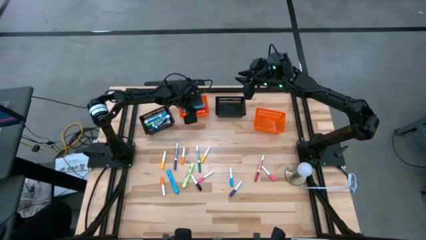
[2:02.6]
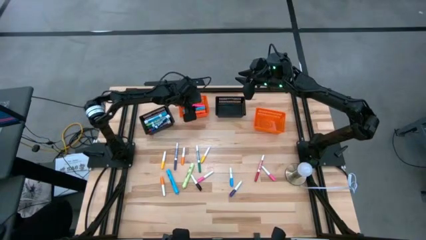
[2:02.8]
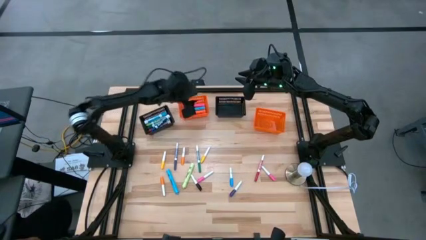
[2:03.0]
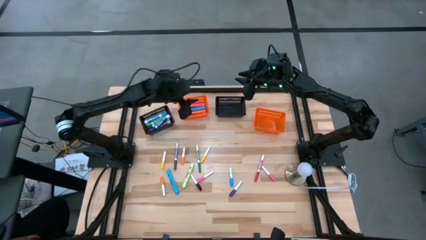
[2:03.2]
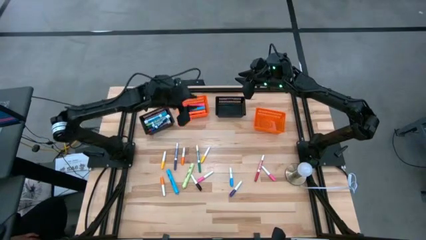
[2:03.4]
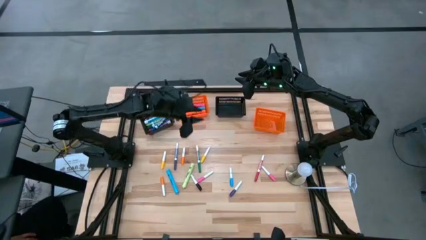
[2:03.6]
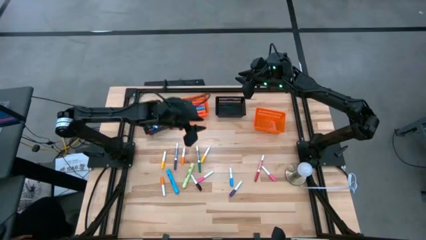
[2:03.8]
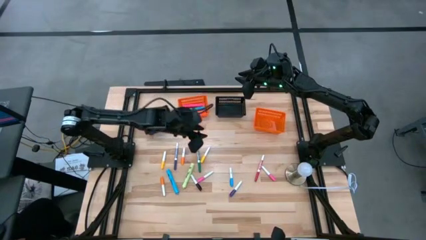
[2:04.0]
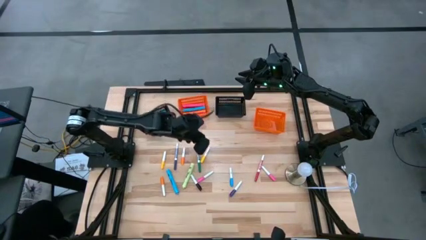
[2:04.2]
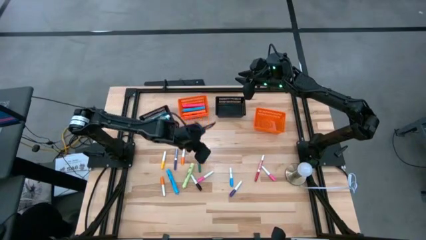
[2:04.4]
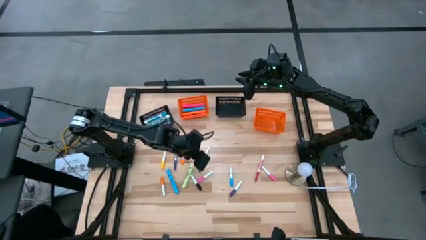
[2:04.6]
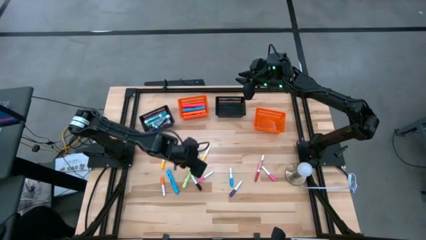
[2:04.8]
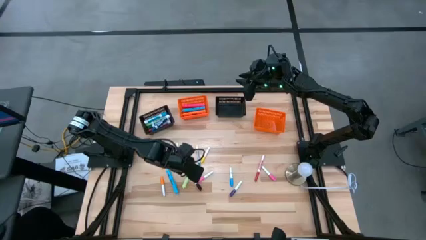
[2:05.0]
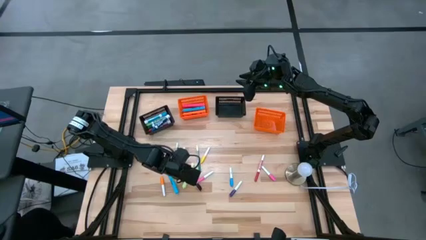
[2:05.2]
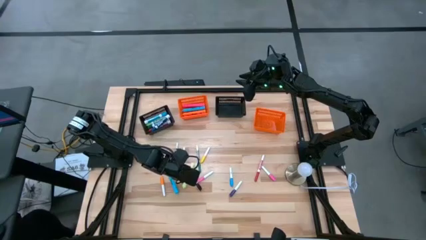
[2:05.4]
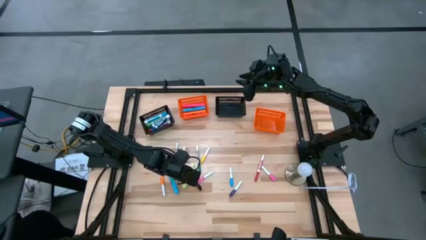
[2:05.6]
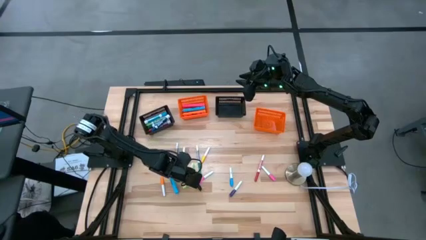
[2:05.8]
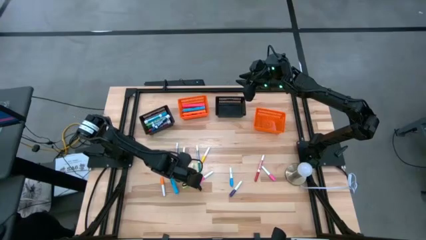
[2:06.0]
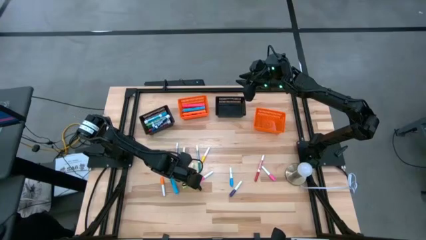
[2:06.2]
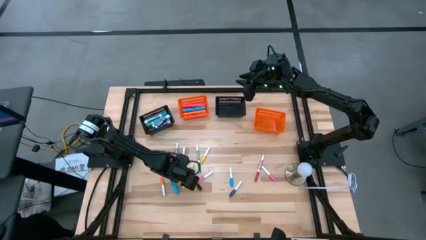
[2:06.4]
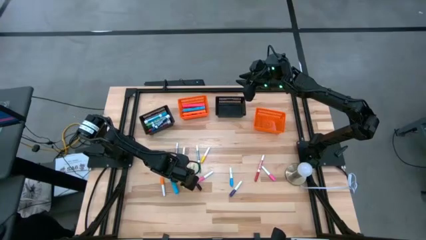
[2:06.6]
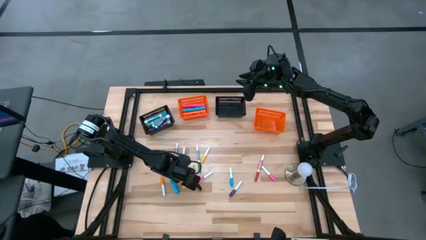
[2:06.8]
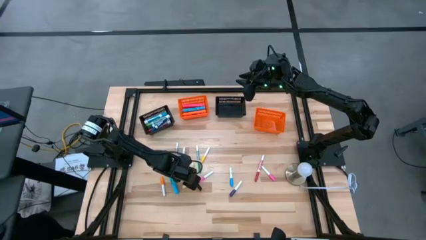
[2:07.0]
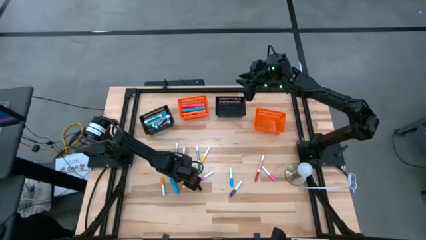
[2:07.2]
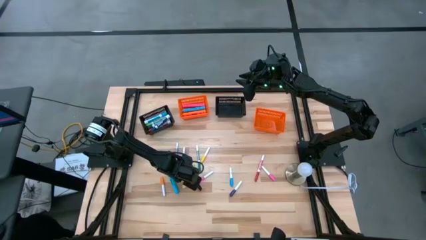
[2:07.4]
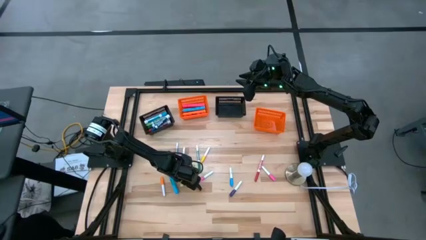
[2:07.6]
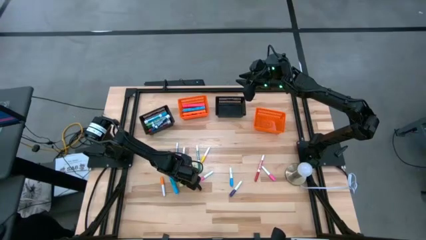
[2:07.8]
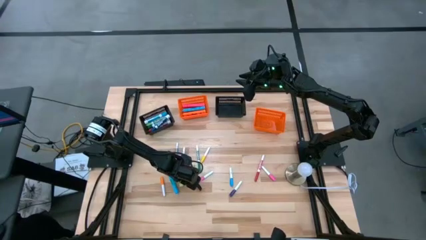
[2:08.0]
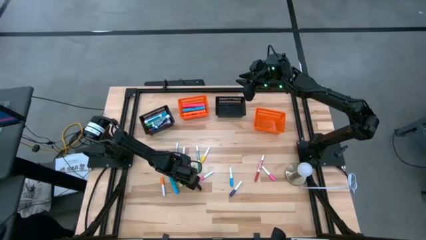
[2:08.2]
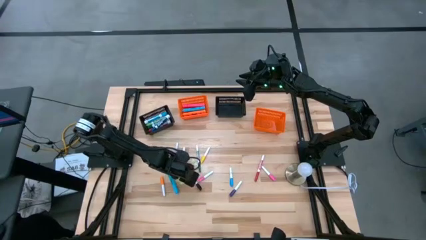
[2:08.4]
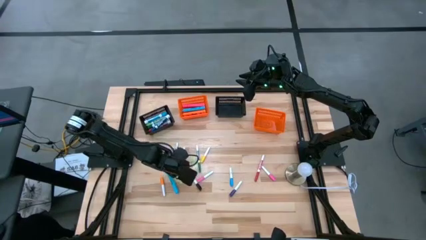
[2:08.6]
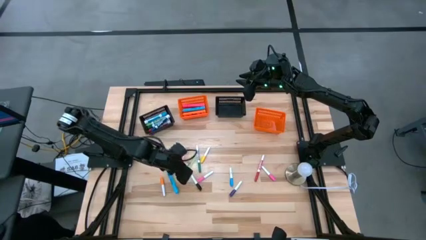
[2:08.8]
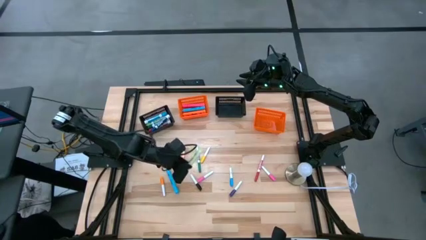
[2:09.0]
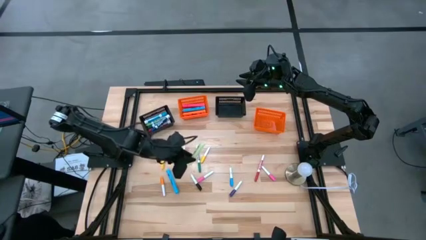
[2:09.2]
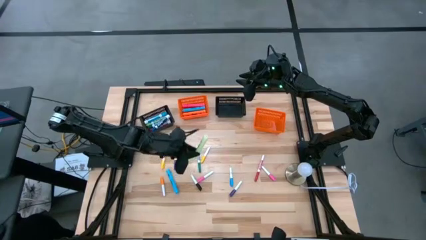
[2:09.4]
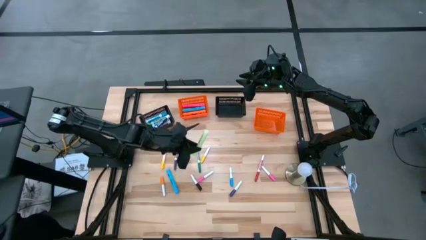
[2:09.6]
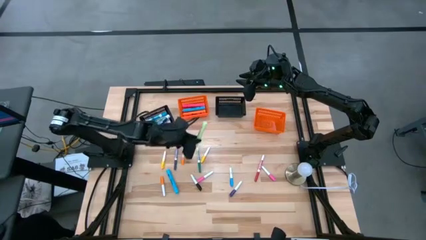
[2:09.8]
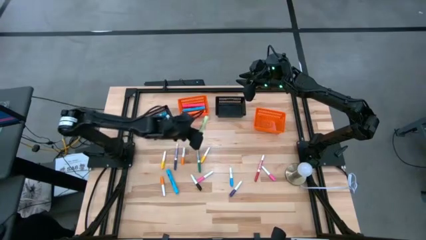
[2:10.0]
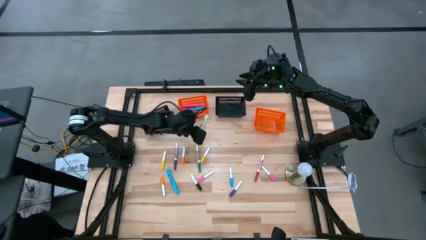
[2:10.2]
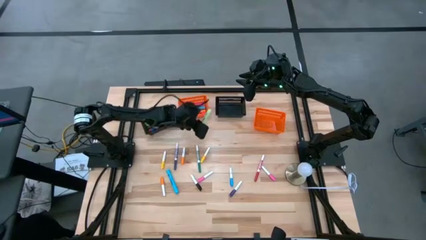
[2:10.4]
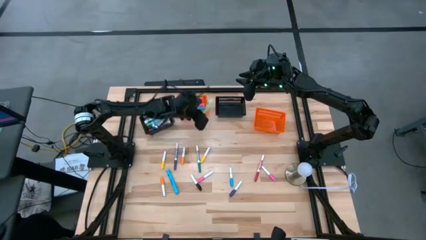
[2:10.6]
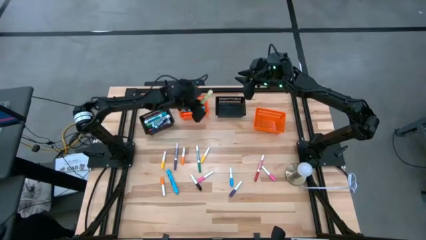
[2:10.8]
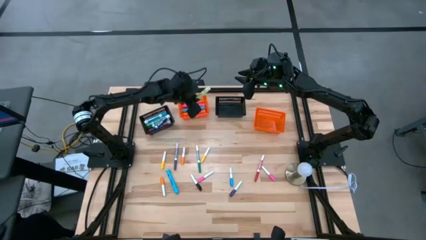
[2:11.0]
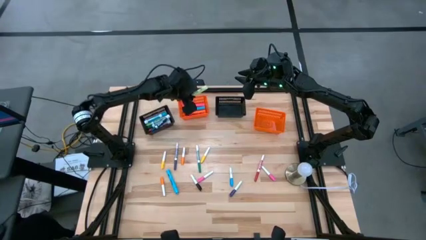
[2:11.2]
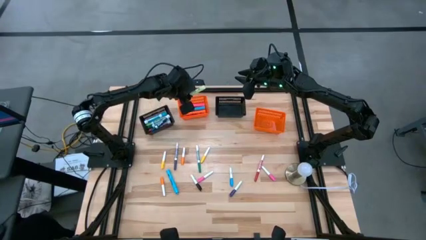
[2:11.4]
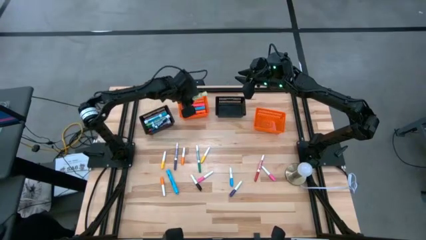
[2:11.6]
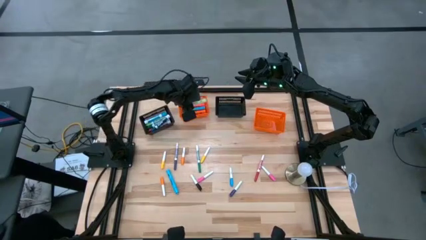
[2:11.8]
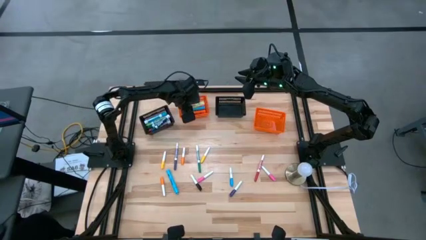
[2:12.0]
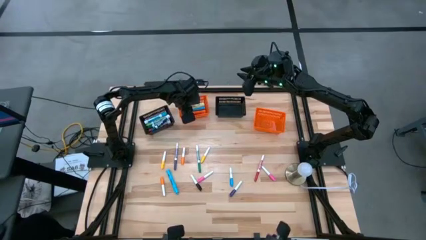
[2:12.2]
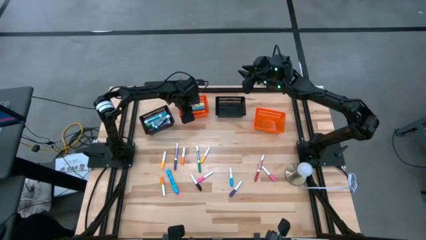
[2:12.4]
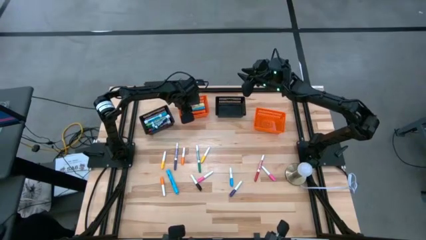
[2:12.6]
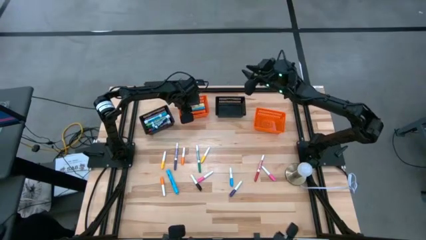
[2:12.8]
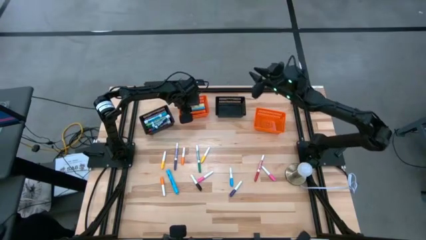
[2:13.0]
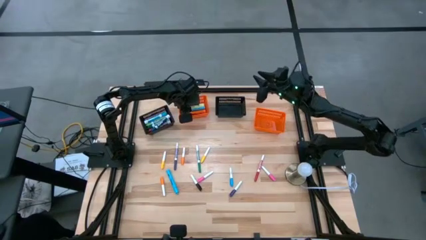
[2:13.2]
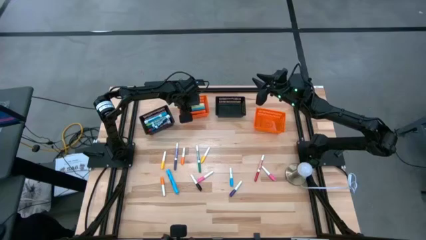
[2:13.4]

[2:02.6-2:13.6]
Task: Pick & Place Markers
Put the large light green highlighter pen into the left orange bin
